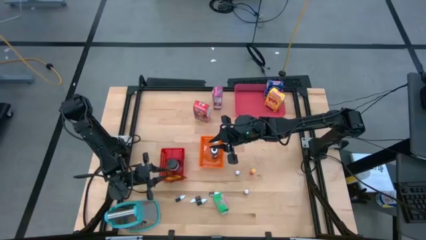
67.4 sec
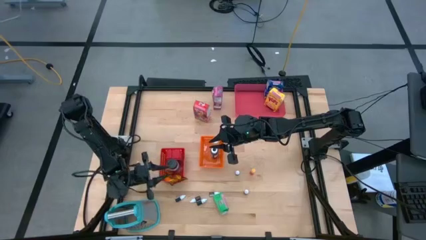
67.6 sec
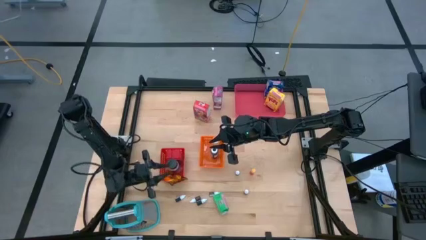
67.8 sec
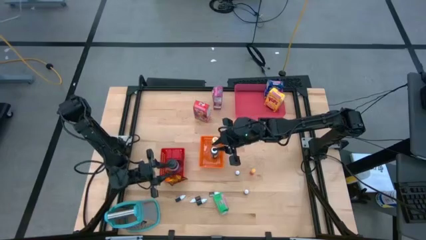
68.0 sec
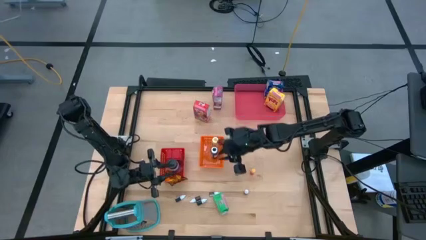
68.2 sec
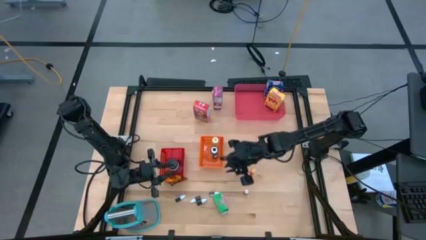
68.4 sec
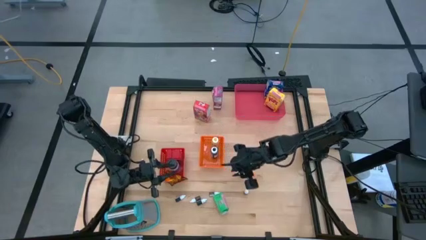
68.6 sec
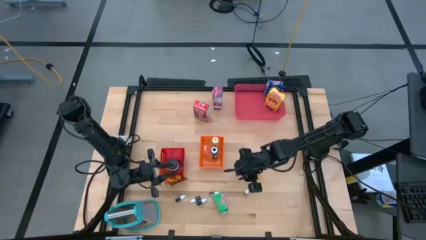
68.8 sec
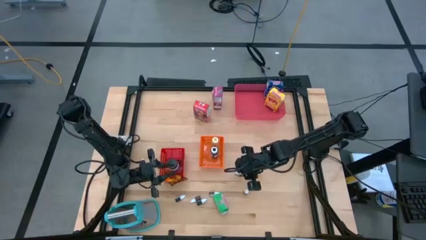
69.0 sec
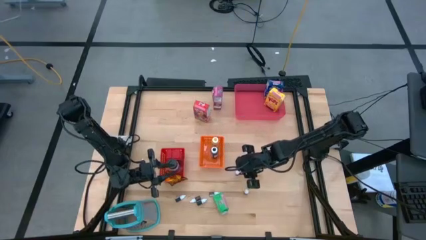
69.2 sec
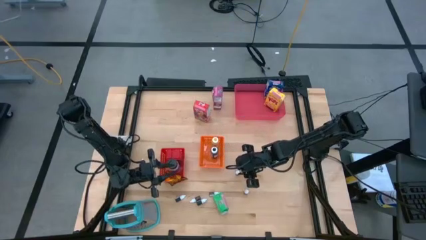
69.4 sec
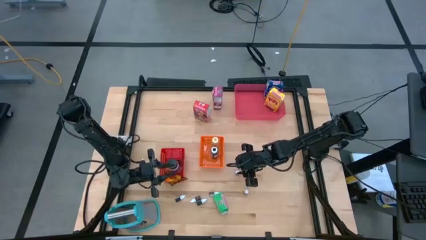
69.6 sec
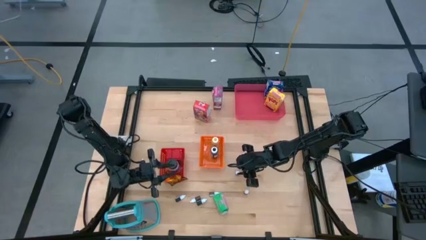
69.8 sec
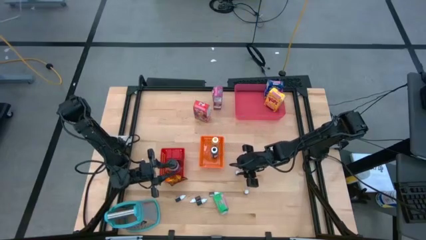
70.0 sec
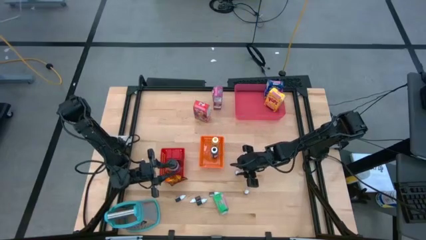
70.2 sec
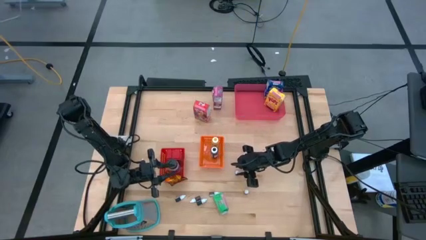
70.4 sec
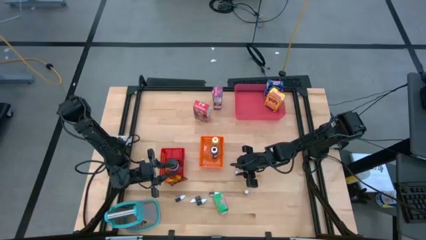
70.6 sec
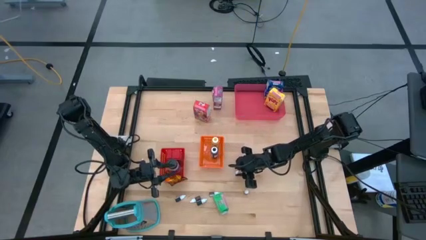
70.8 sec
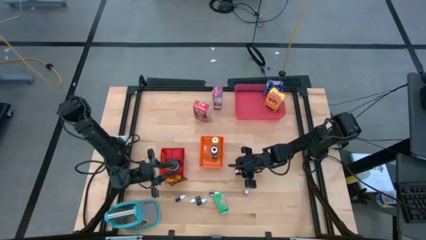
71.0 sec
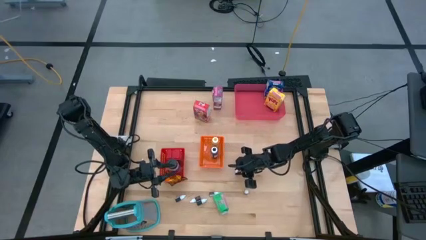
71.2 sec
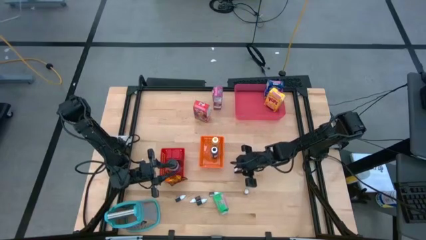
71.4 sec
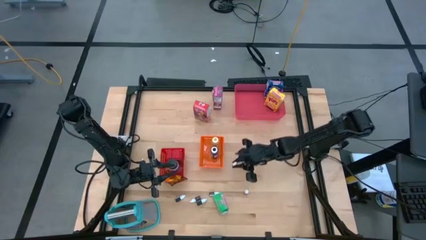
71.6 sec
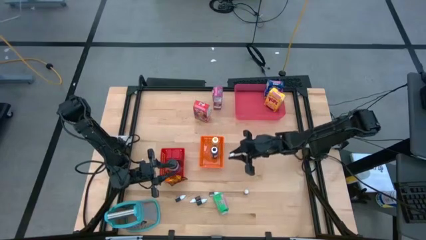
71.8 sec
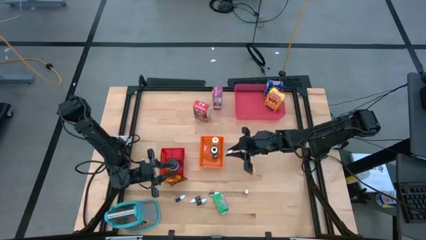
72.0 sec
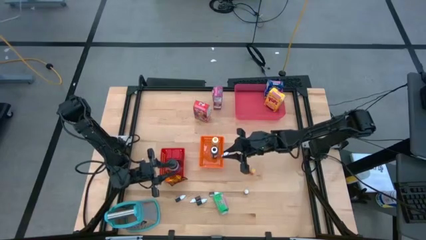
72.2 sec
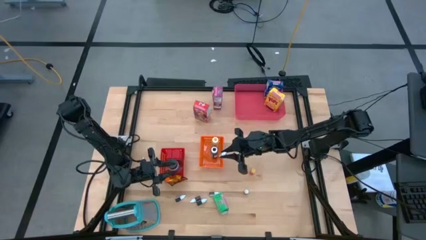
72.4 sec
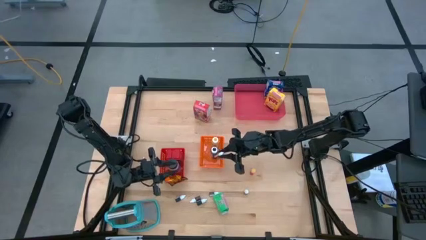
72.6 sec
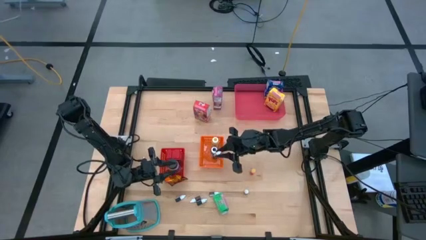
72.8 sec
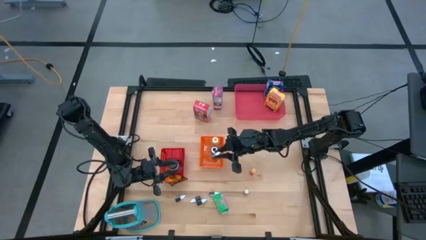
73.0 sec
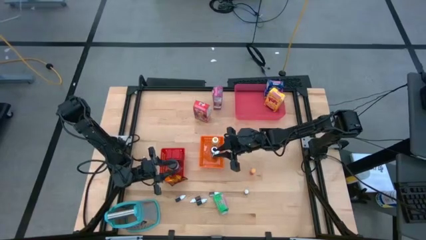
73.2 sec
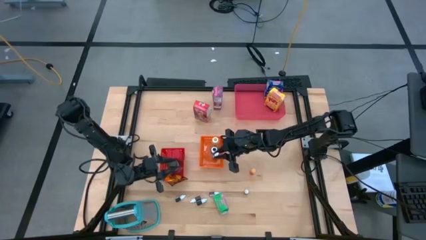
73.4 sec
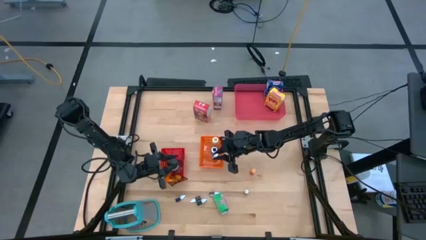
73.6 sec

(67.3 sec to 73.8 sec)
Task: Pick & Place Kitchen Items
Put the small top black food coloring bottle into the orange bin

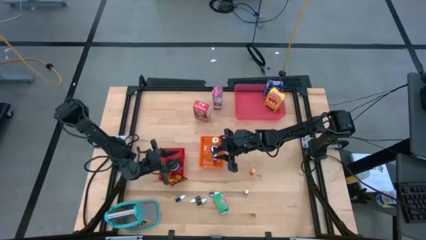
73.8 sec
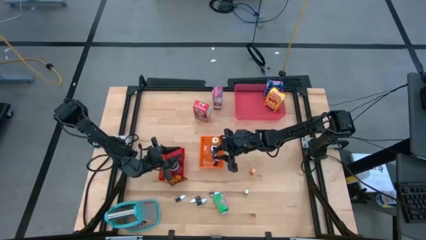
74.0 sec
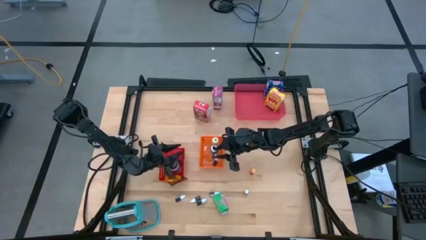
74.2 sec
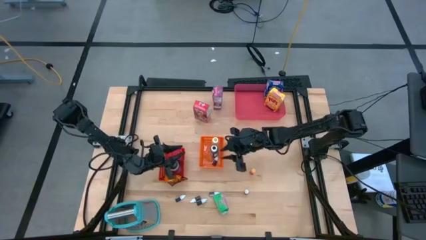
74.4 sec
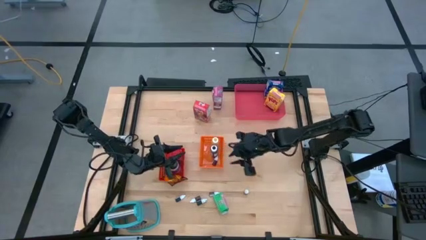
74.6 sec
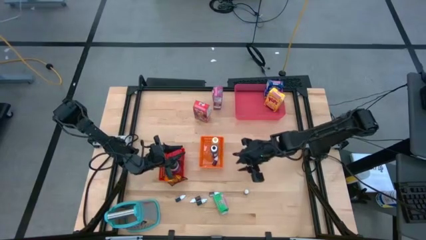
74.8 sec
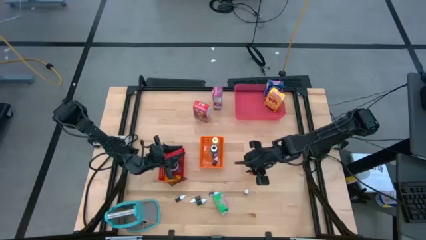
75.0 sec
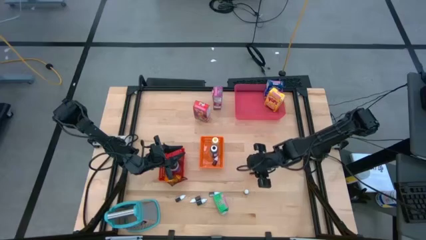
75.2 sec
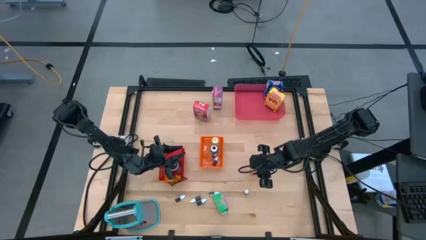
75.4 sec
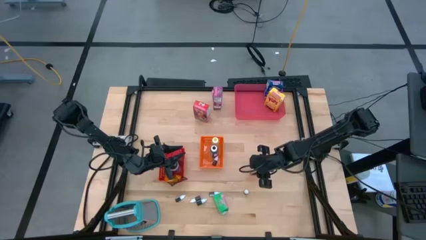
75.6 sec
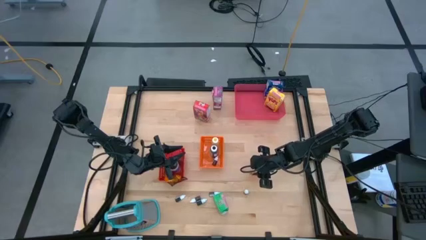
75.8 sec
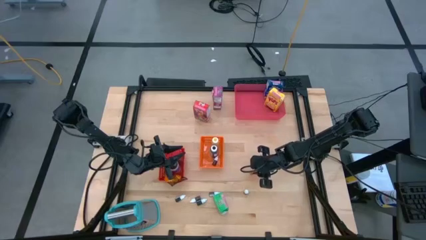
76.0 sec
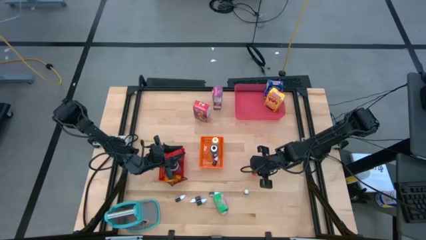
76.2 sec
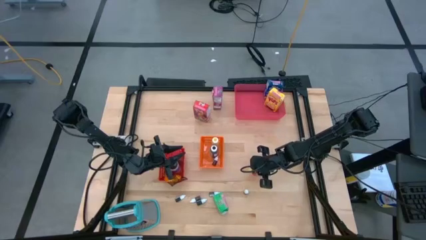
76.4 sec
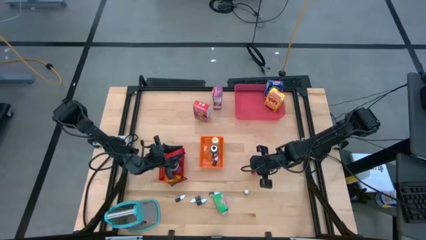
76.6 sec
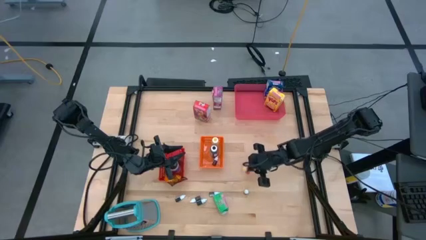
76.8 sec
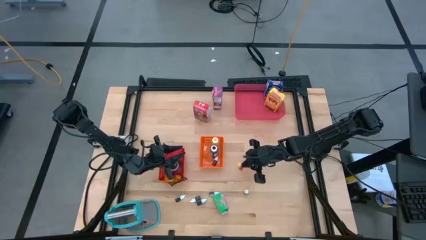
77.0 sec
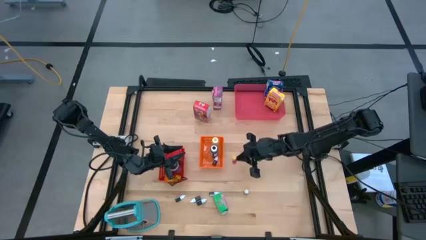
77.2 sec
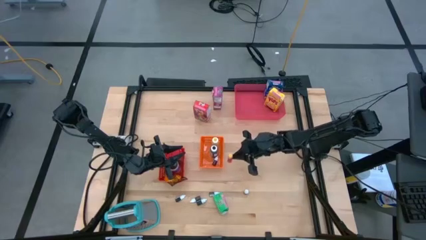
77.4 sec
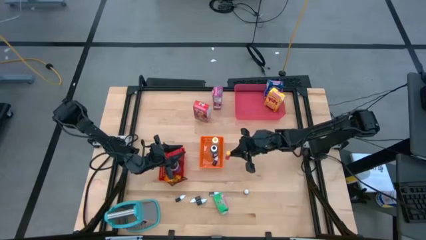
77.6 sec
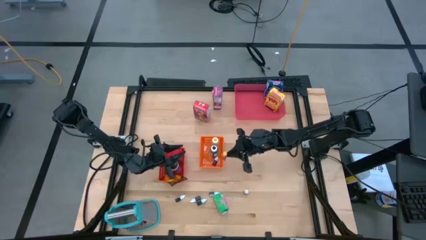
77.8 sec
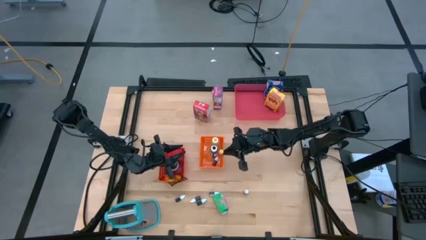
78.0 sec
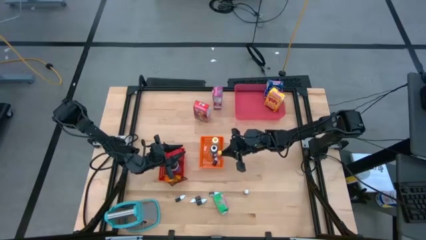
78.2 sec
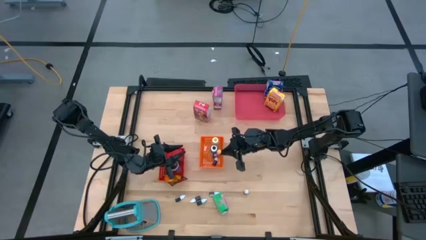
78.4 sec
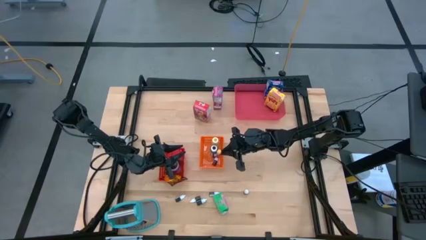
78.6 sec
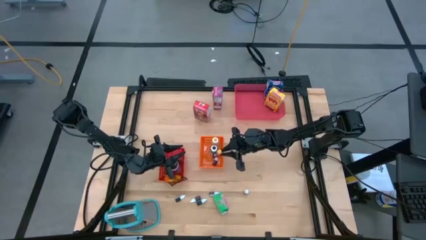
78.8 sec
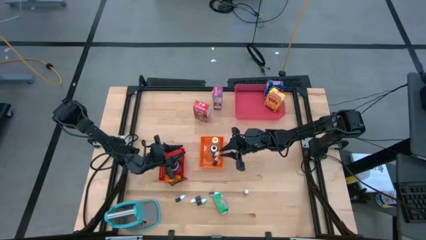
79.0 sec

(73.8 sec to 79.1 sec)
Put the small yellow food coloring bottle into the orange bin

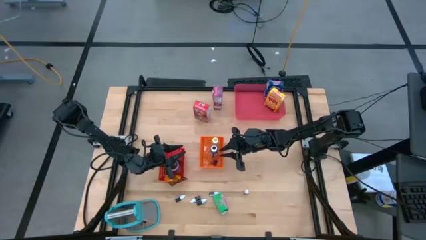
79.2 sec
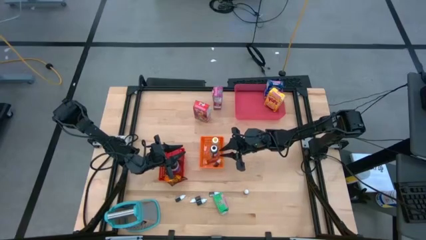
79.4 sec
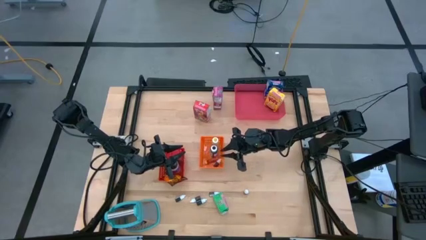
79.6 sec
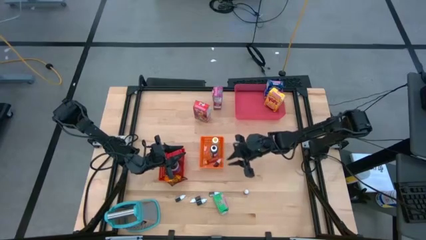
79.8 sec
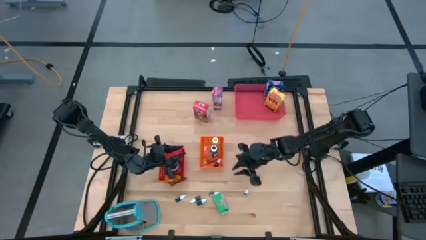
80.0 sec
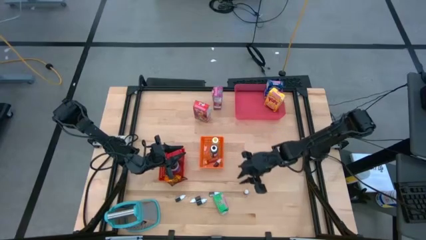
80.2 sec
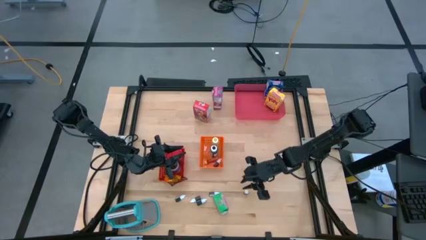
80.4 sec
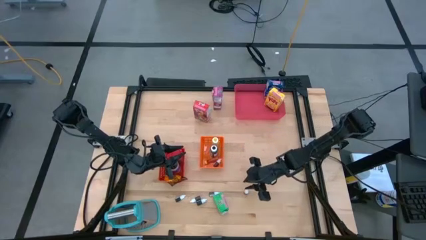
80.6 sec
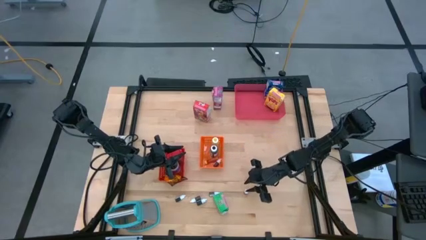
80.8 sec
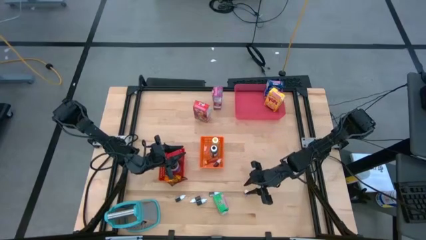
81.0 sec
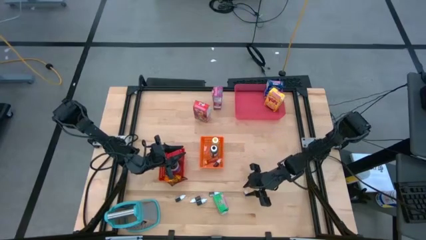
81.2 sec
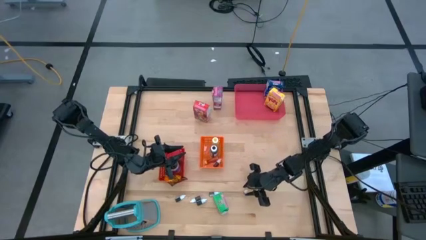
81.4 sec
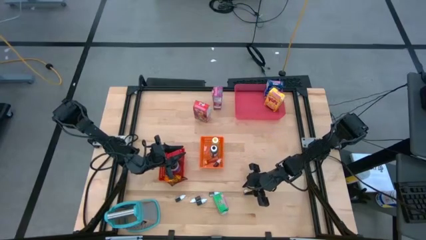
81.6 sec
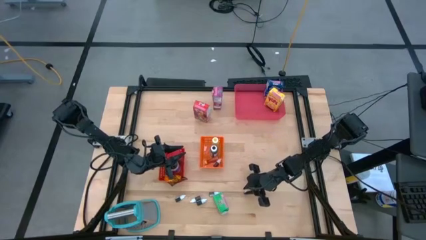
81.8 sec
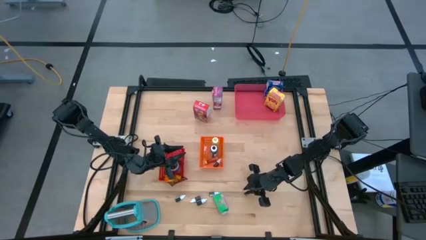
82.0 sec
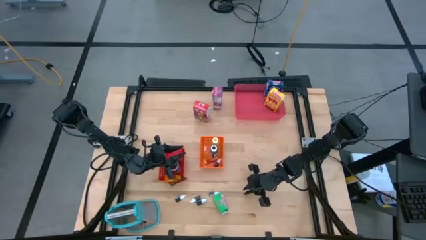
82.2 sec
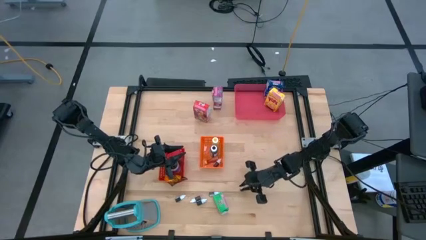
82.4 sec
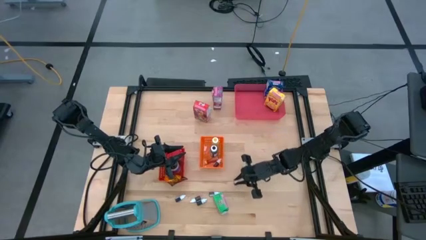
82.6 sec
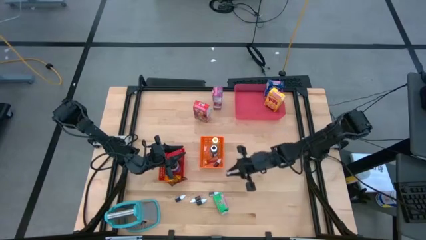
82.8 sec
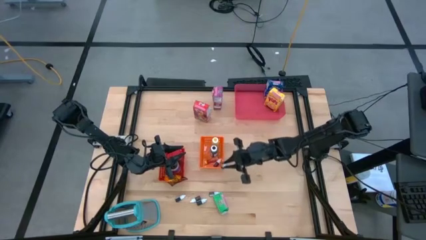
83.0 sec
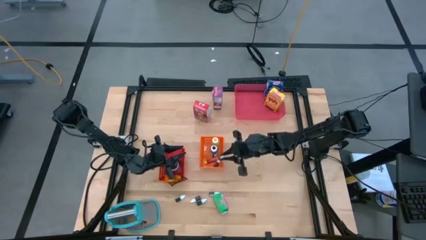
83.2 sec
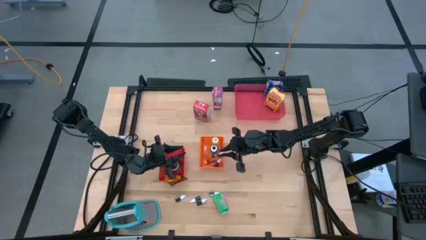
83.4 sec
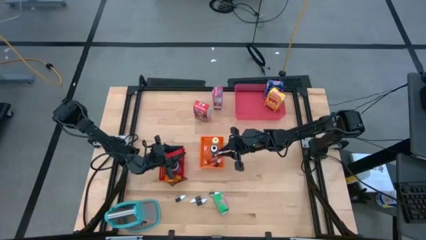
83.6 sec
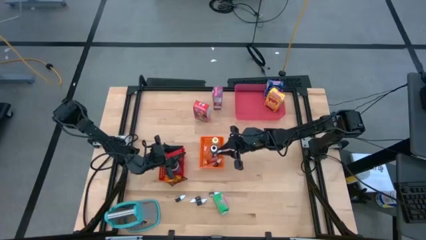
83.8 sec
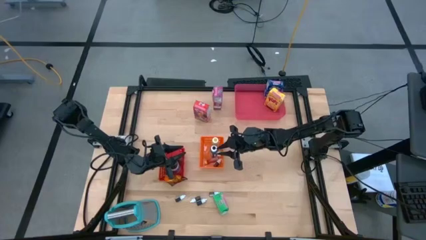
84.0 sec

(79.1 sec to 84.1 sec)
Put the small pink food coloring bottle into the orange bin
